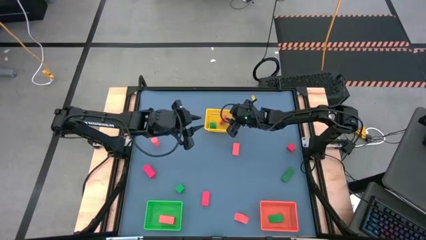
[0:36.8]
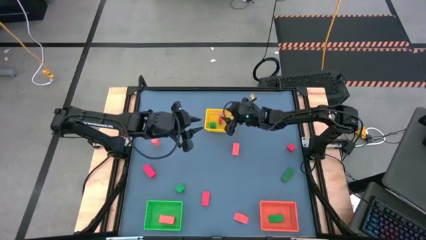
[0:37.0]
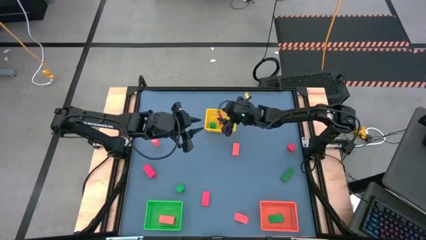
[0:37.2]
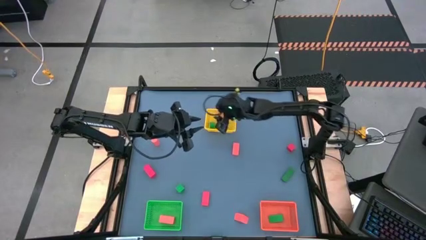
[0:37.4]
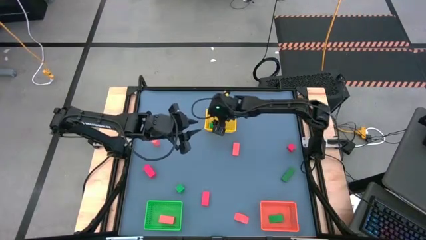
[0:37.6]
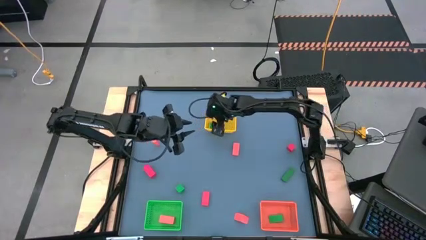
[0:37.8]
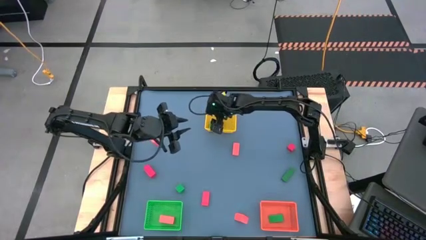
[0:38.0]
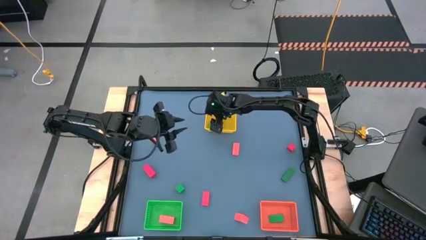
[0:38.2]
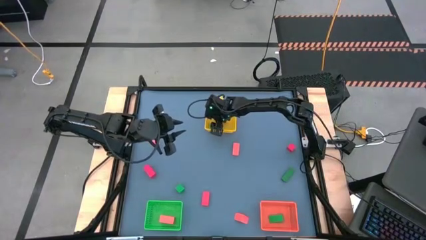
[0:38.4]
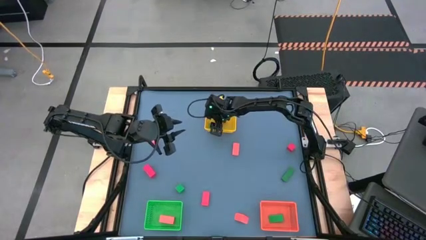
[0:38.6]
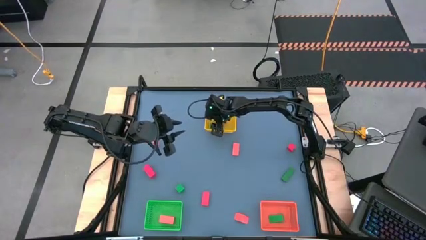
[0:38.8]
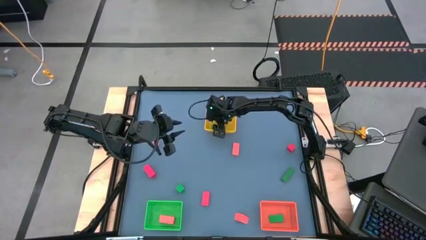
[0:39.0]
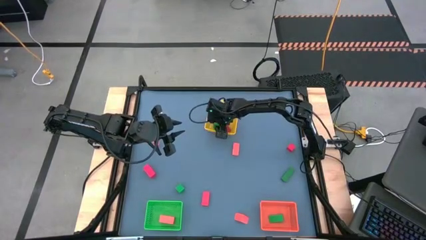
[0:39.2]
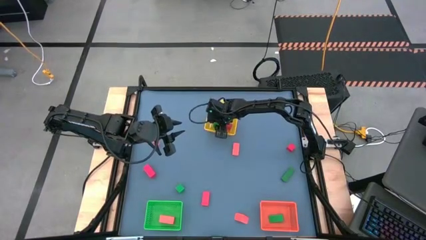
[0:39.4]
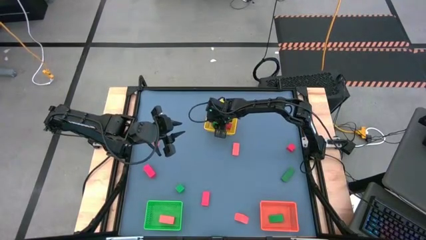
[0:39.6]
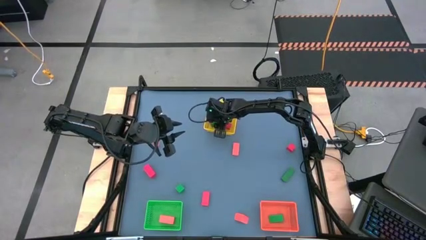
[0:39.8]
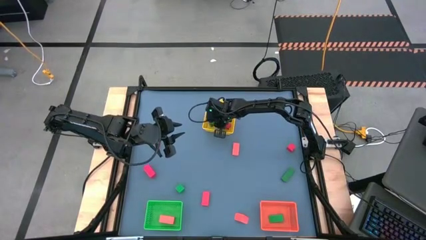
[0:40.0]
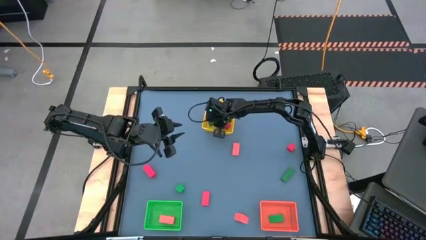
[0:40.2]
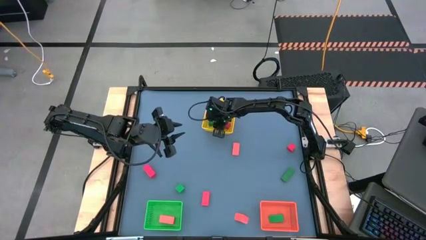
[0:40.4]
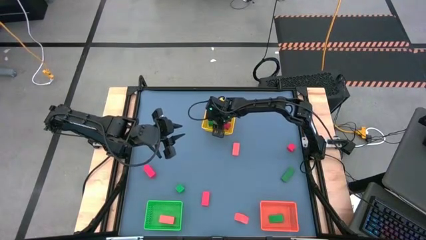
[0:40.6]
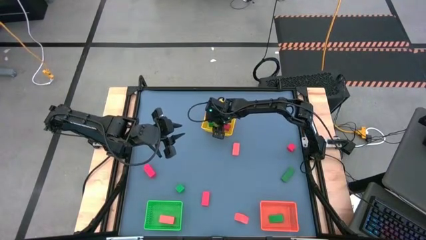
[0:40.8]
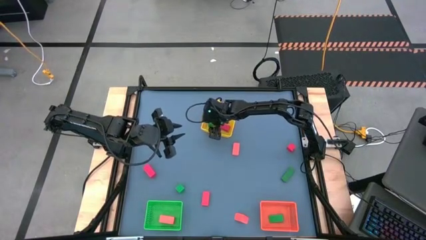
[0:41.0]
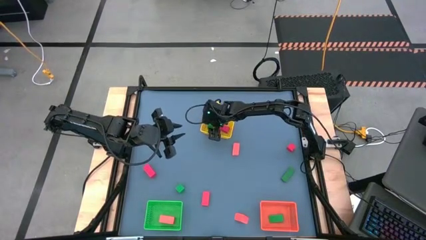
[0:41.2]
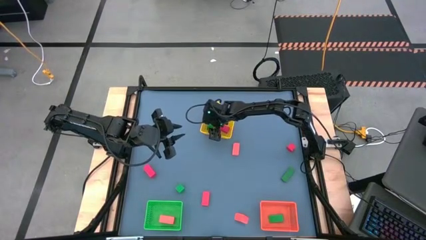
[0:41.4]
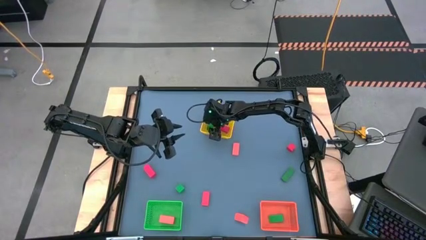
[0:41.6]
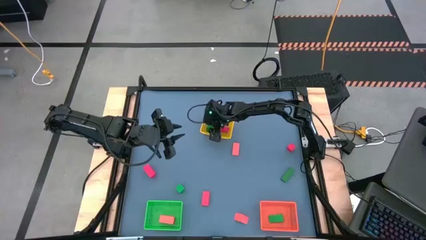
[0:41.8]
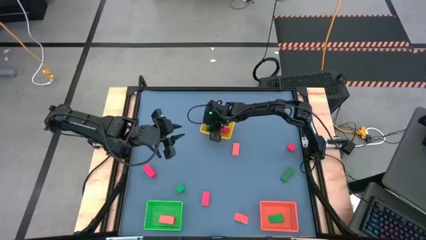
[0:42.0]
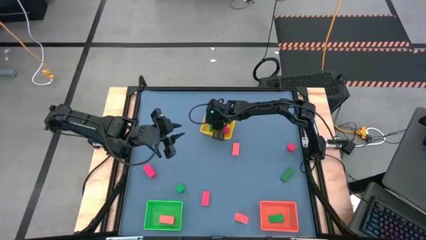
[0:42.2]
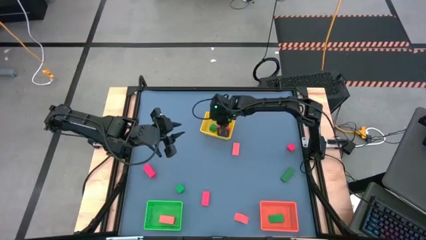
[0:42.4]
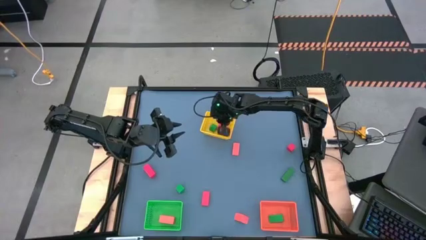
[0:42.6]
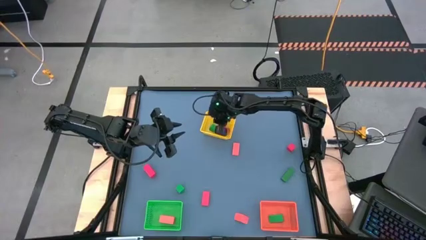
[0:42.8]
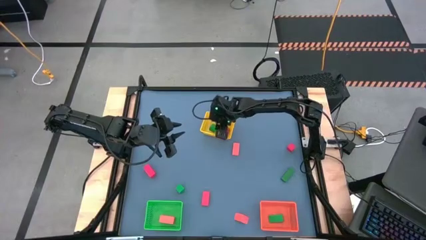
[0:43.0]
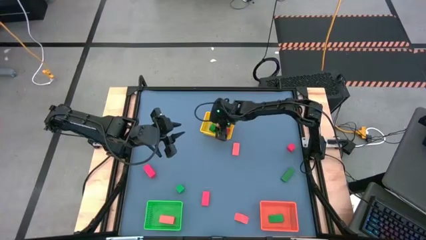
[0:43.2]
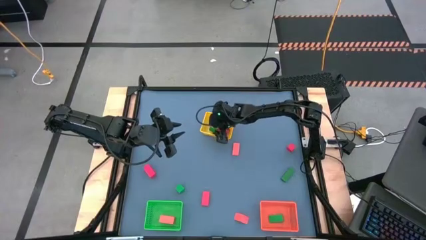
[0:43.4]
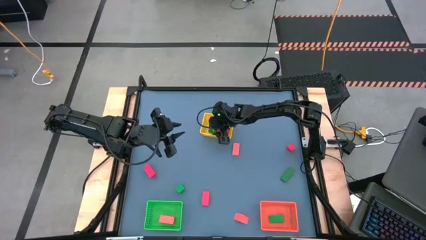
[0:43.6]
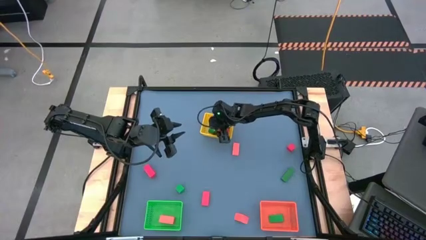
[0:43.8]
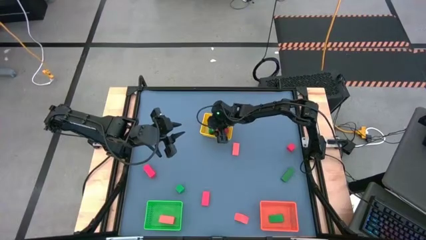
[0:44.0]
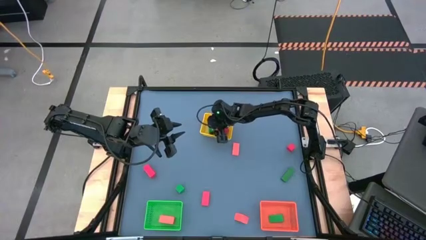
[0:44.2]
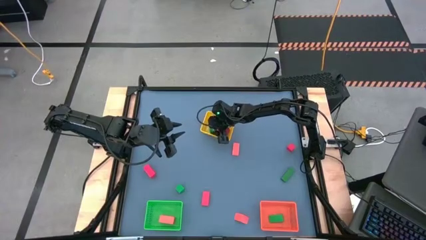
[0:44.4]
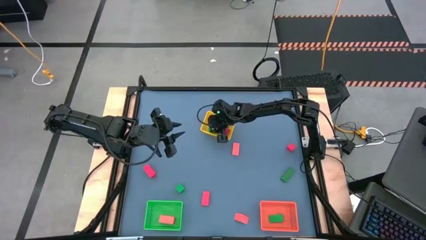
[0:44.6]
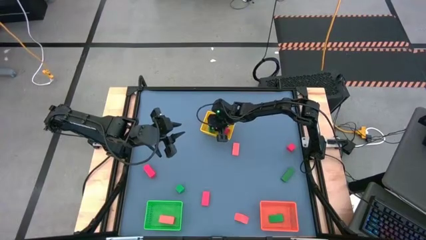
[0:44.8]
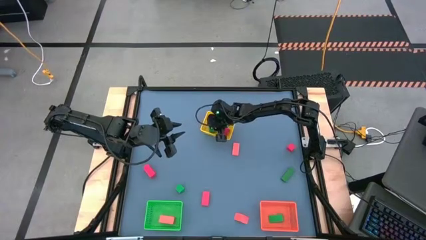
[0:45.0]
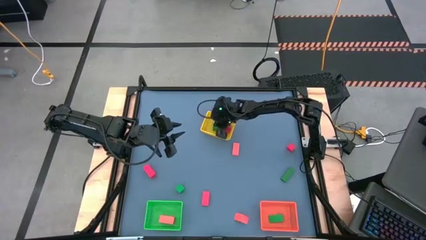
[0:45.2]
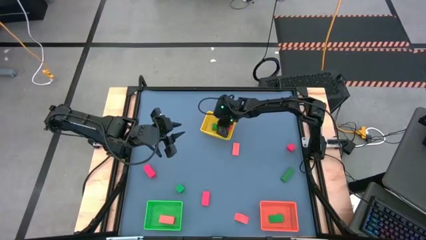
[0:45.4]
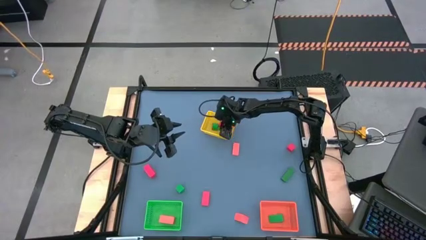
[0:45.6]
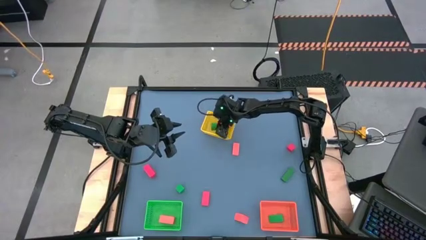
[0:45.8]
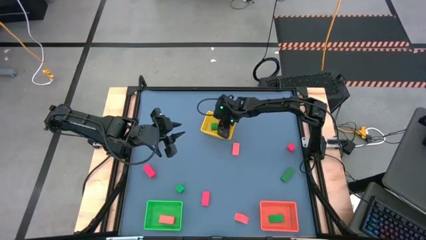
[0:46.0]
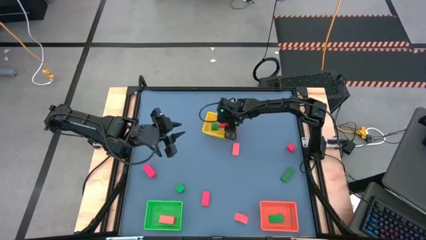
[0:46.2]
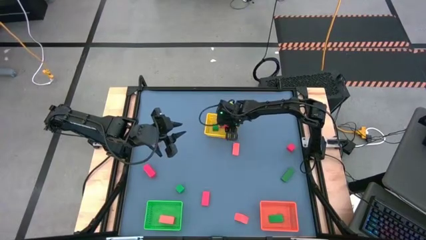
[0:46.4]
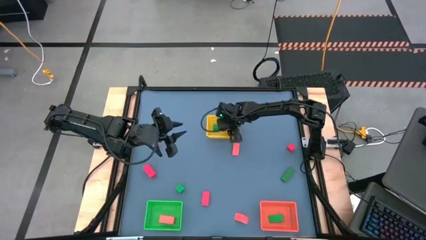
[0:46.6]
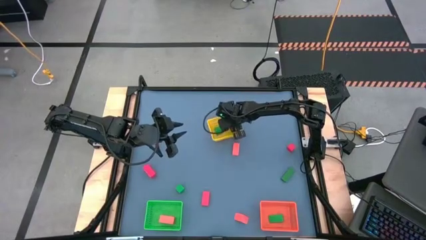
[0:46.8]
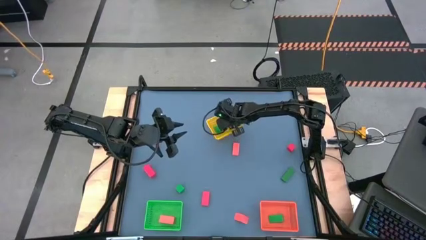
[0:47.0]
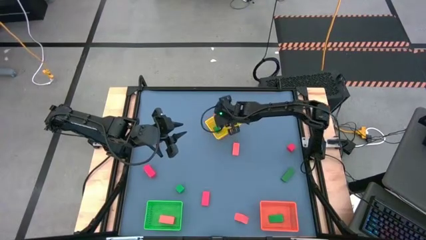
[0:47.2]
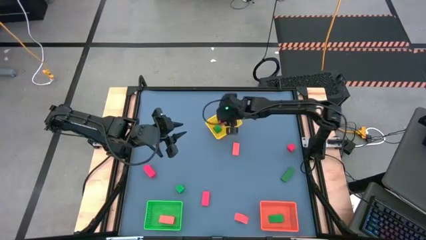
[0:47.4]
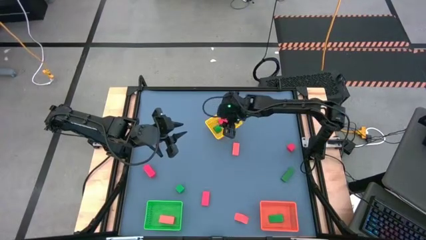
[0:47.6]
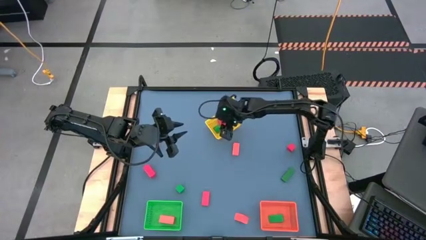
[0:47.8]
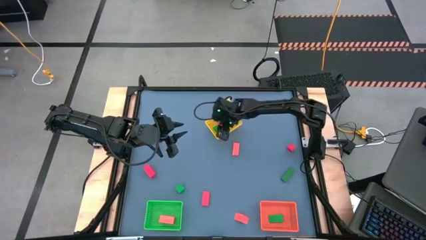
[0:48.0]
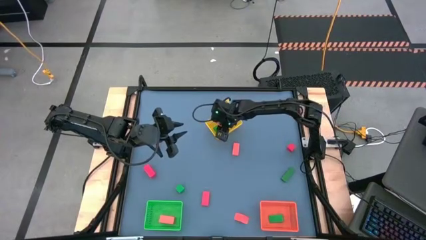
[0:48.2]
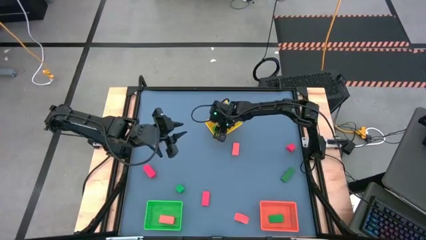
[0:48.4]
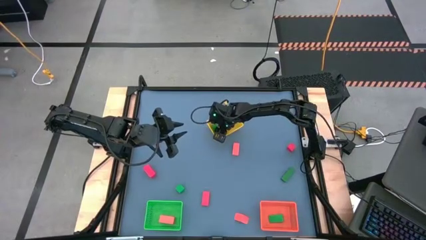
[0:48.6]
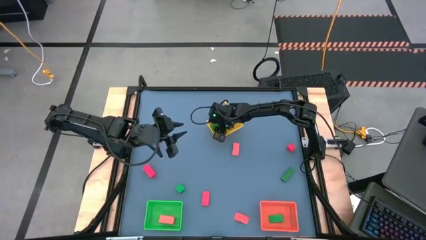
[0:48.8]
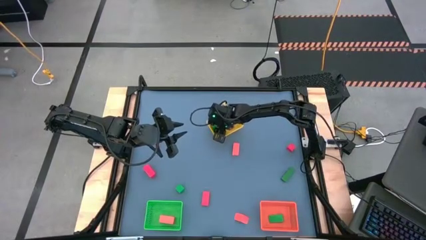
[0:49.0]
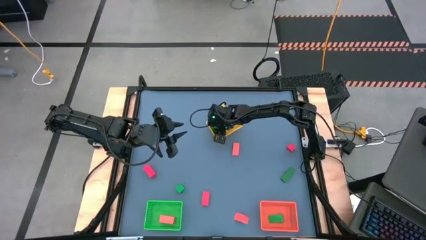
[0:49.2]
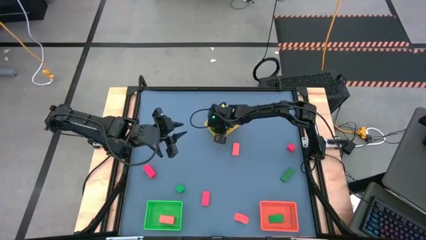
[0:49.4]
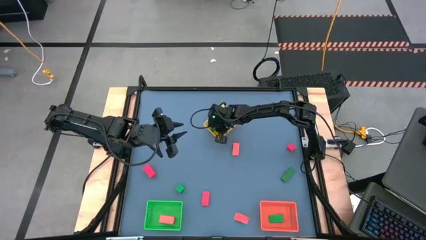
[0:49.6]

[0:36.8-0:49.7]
Task: Sort & place blocks by color
Put the green block into the orange bin

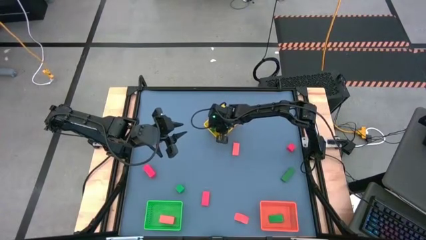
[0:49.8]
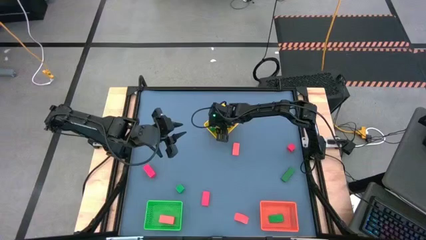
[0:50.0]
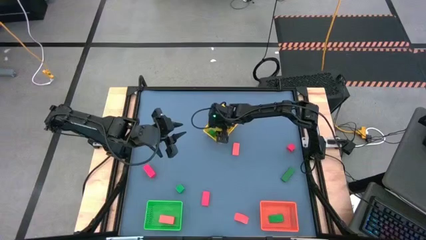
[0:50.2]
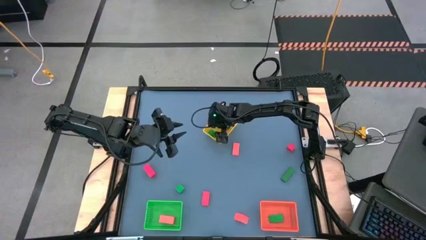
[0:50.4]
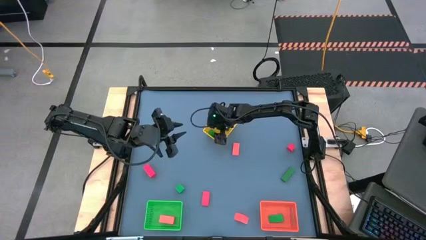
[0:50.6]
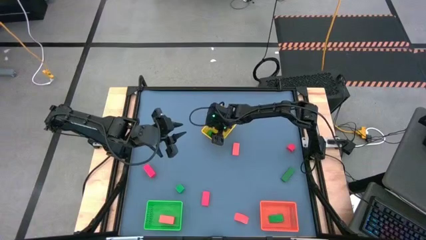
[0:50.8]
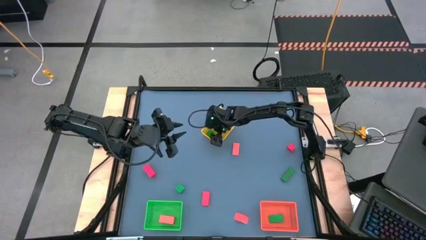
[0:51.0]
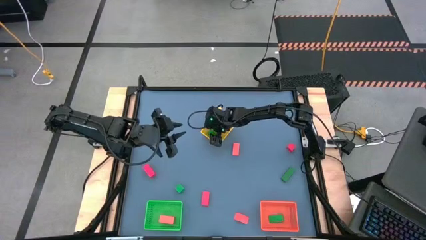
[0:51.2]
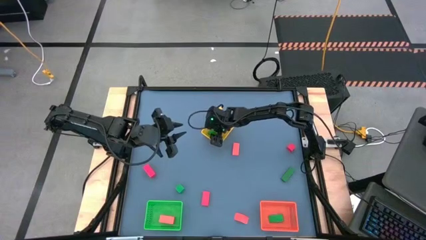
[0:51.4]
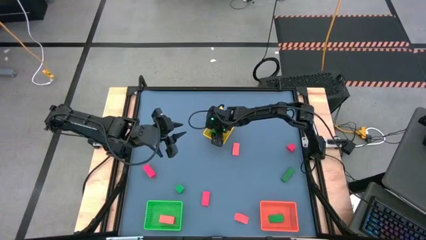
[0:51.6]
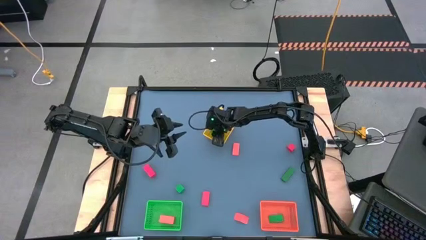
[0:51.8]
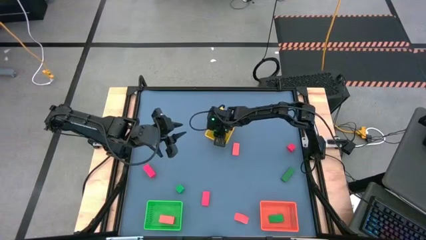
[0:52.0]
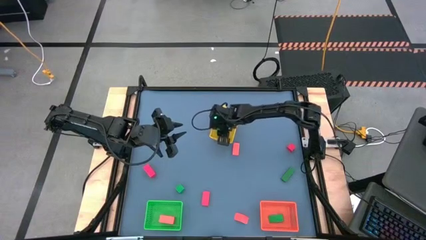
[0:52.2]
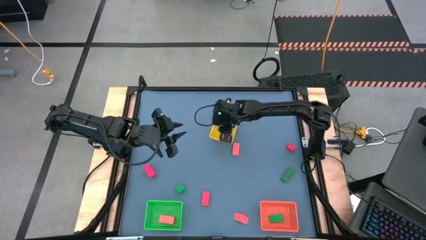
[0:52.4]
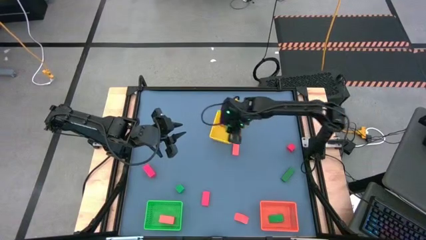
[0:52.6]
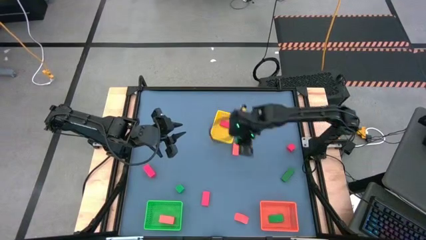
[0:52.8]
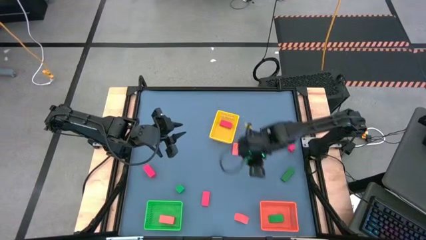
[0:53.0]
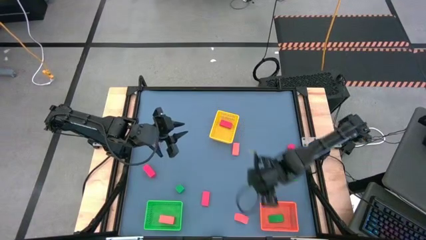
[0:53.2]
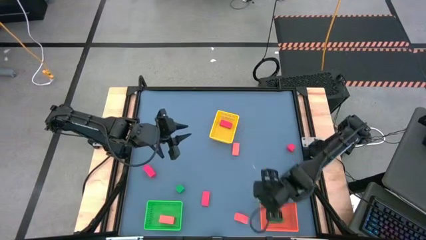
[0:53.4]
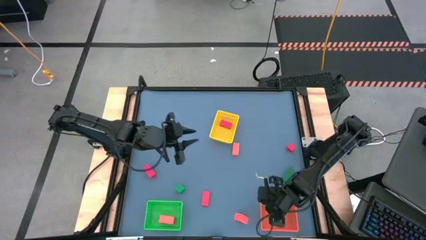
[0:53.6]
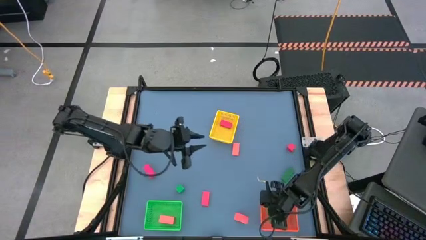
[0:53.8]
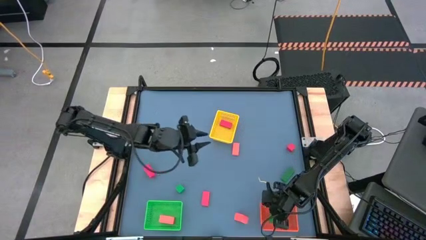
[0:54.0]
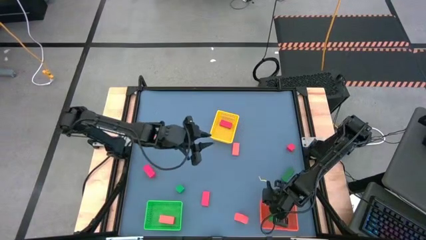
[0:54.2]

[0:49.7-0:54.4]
Put the green block into the orange bin
